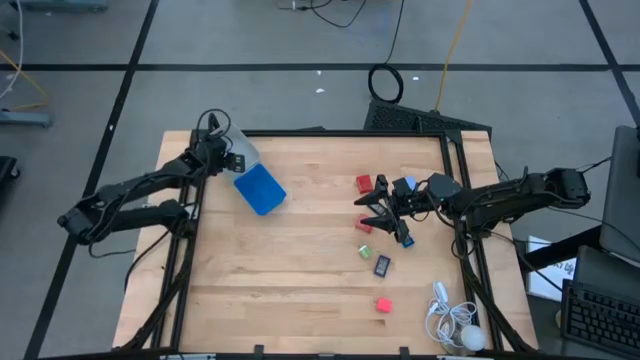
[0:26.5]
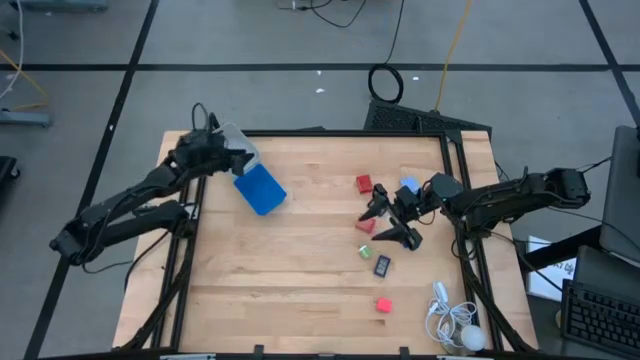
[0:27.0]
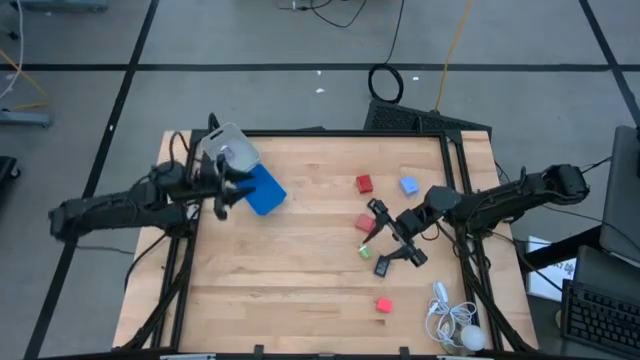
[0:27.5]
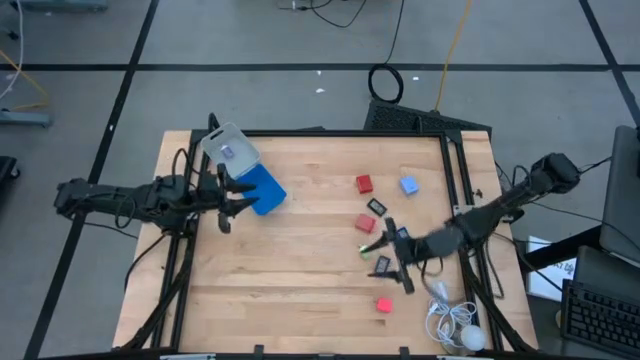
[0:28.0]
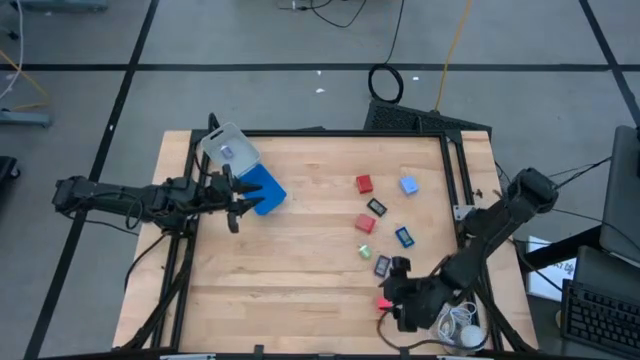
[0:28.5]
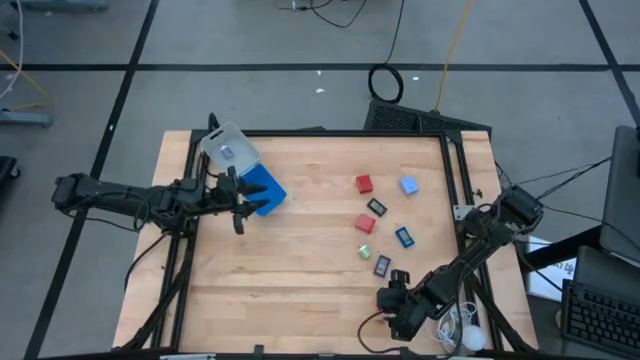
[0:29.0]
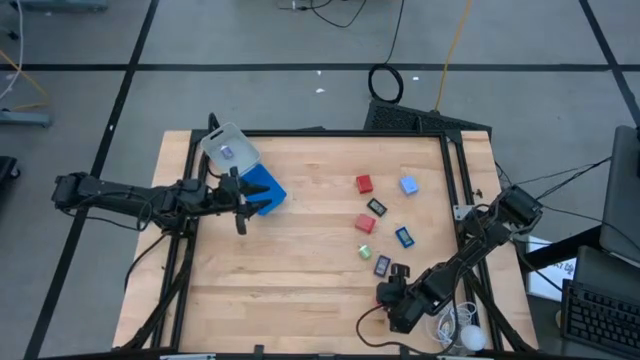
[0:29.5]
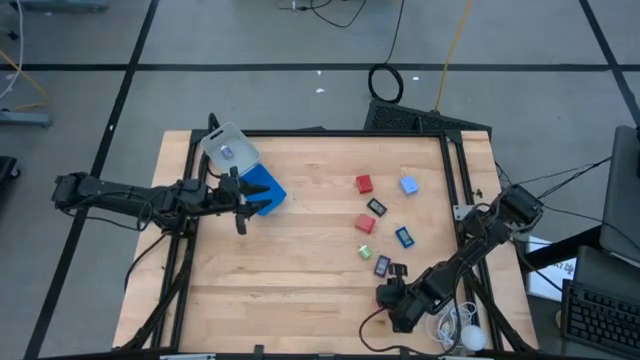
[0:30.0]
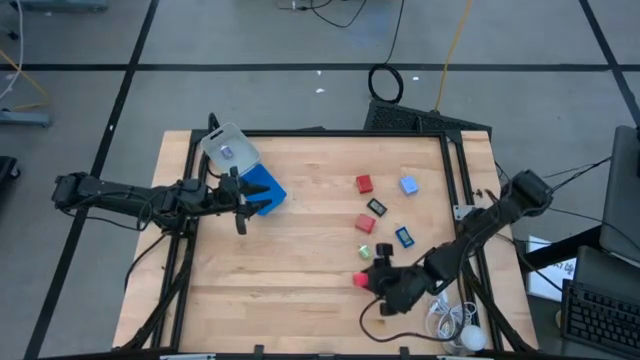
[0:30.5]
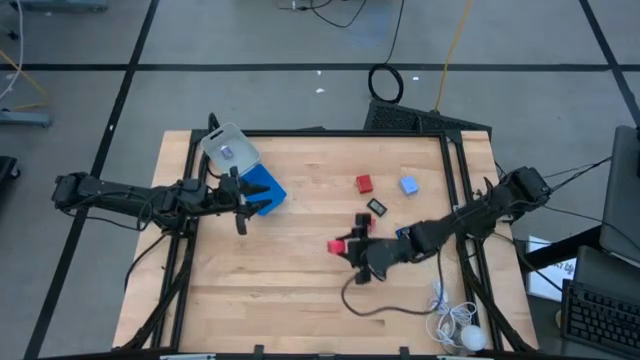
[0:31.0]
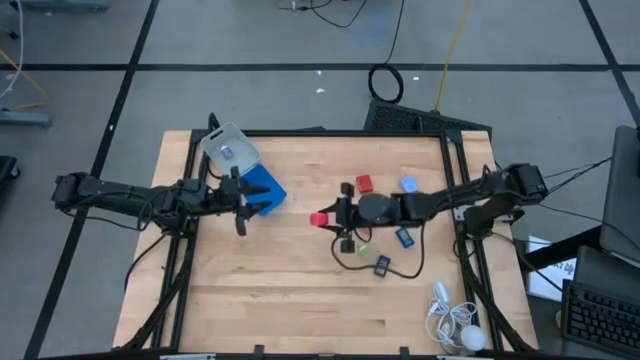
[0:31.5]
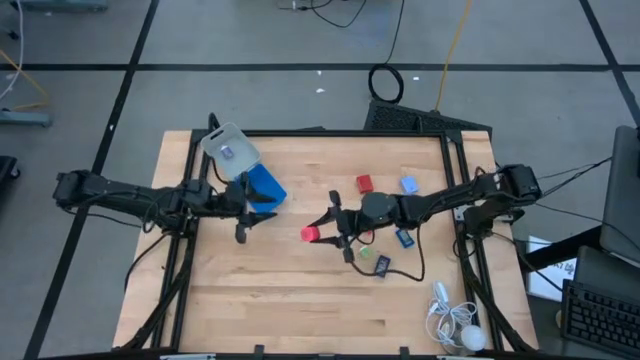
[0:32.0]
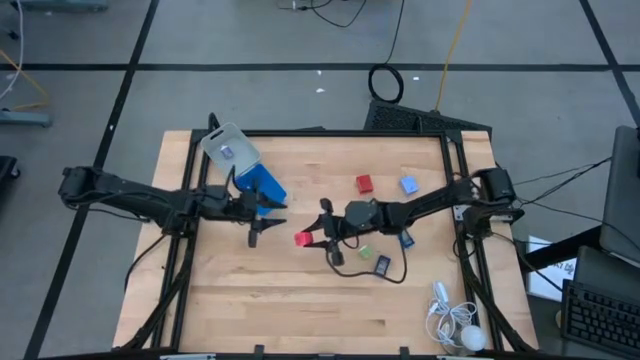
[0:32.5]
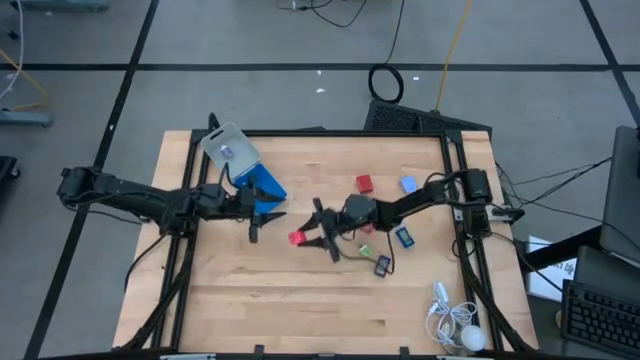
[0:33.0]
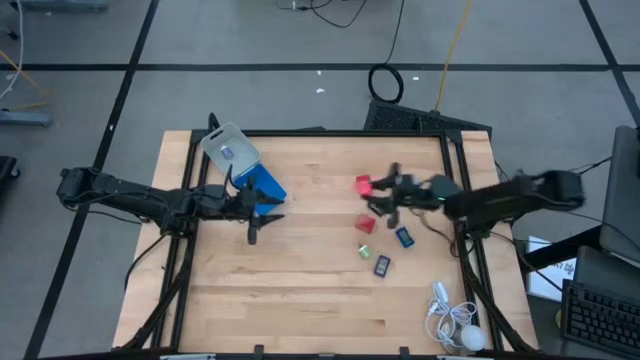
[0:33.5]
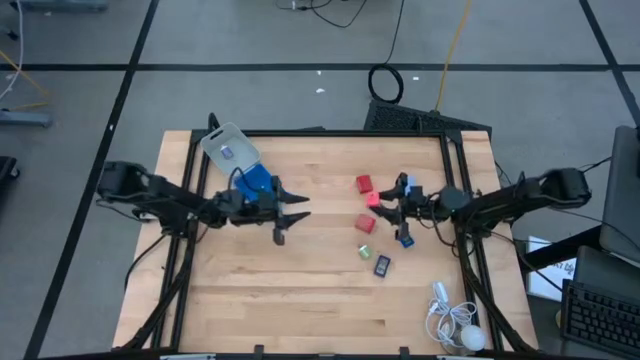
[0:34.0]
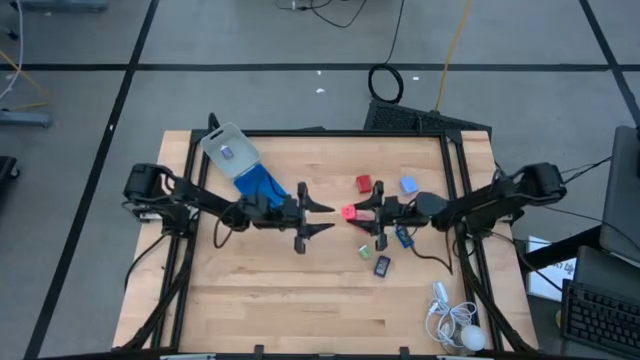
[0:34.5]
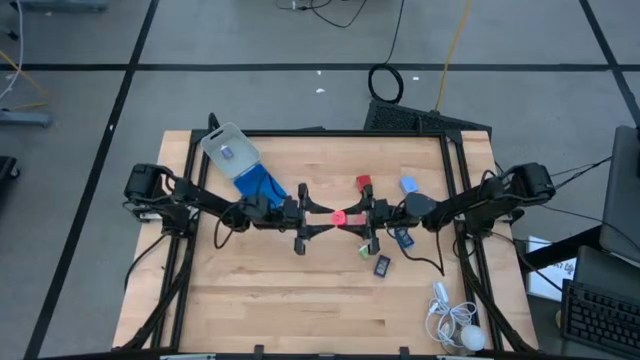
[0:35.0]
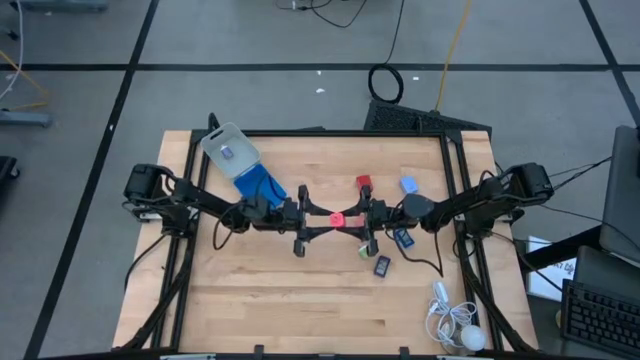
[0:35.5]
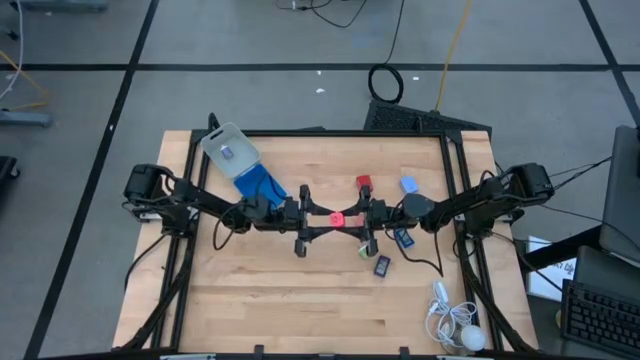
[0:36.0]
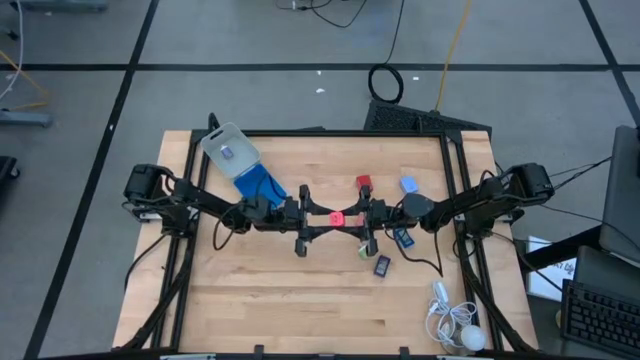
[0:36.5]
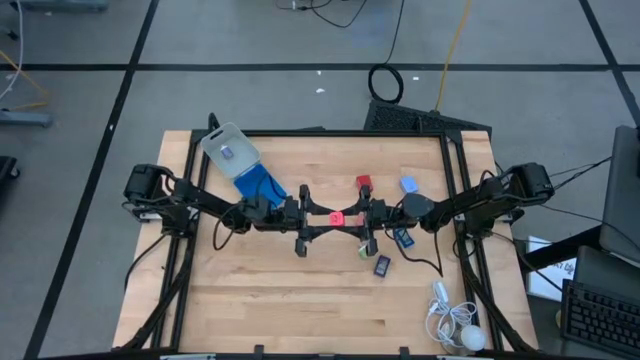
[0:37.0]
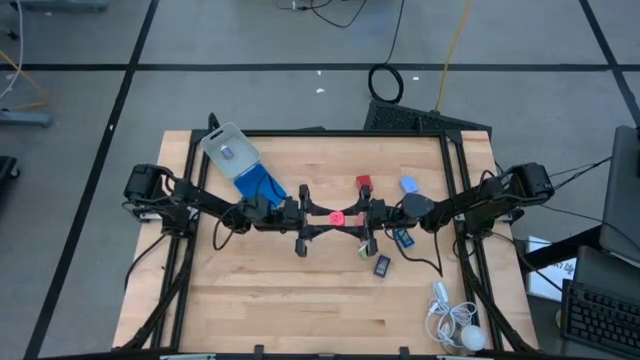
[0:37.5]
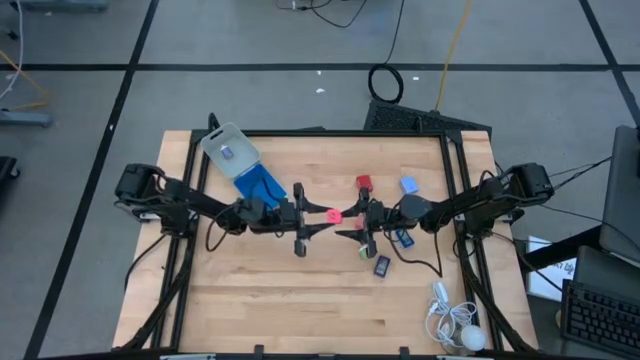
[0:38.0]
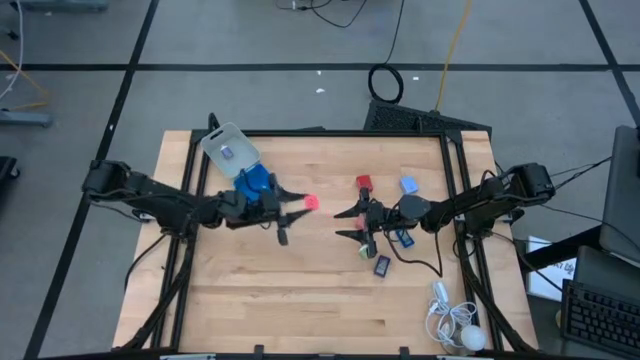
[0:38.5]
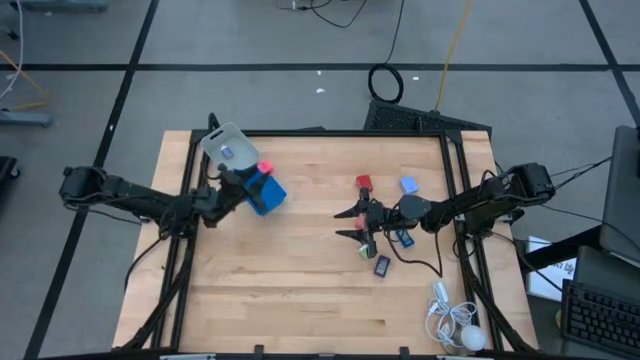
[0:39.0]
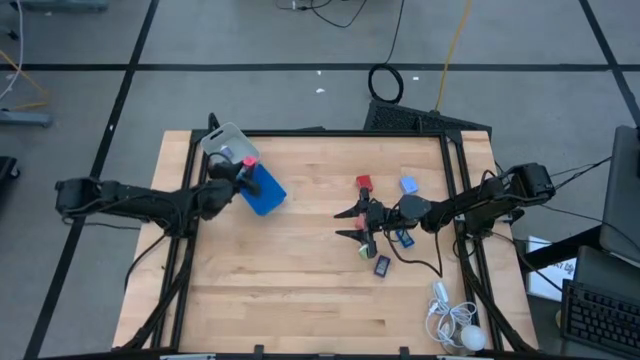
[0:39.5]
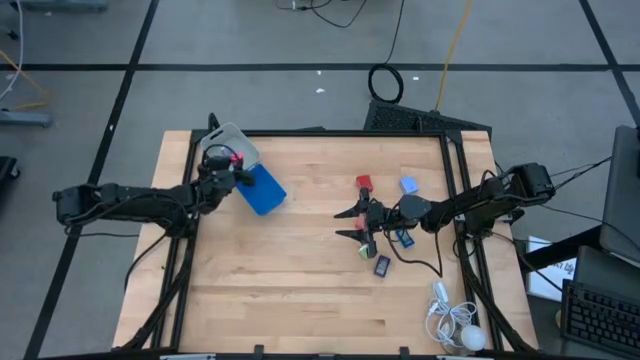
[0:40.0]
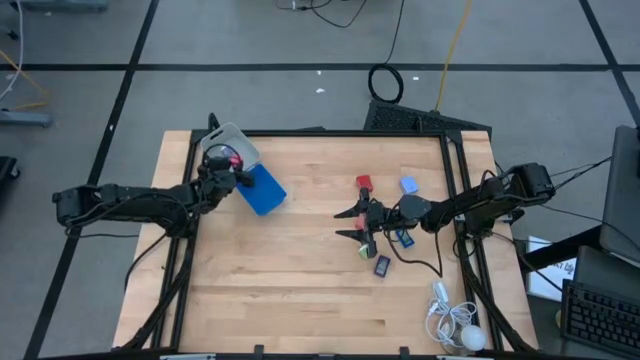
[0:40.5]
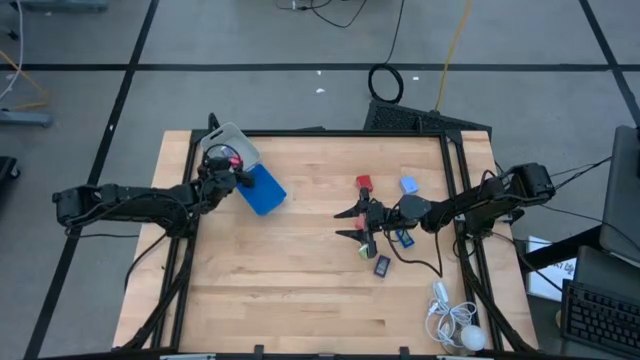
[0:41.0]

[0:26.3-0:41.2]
Task: Pick & Place Office items
Put the pink charger adapter into the gray bin
